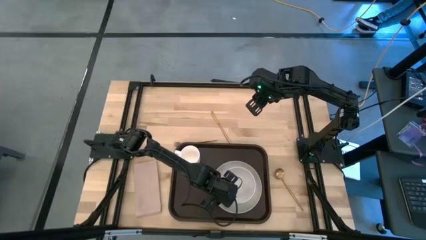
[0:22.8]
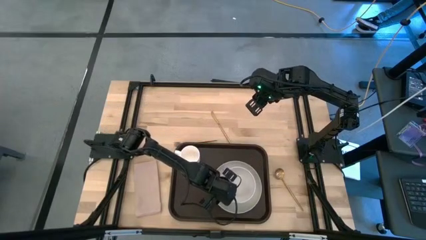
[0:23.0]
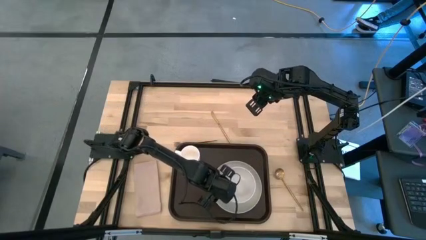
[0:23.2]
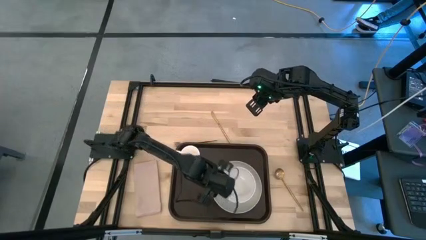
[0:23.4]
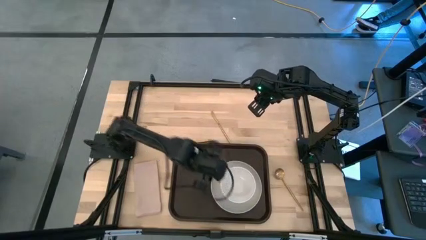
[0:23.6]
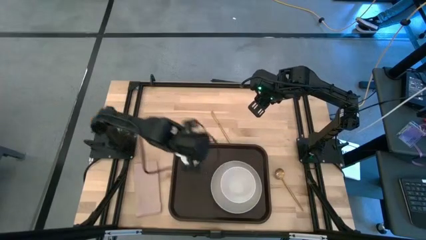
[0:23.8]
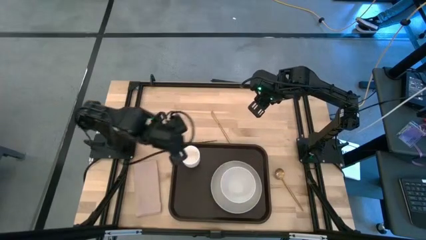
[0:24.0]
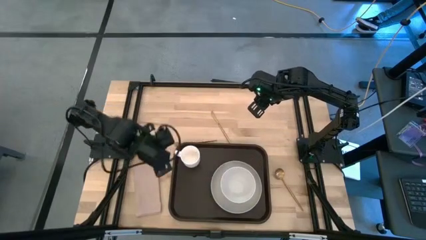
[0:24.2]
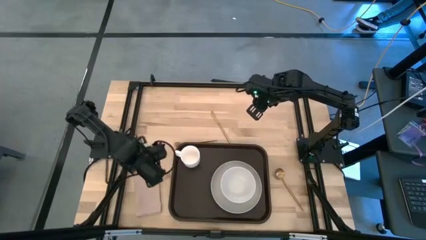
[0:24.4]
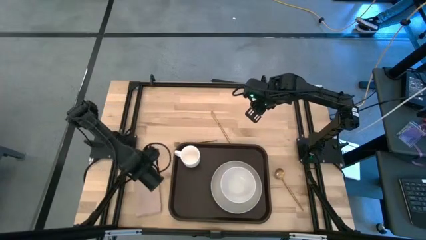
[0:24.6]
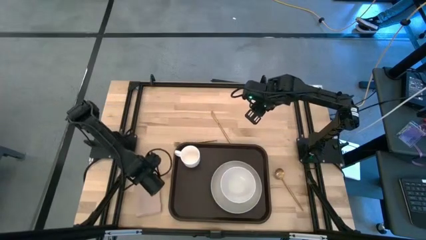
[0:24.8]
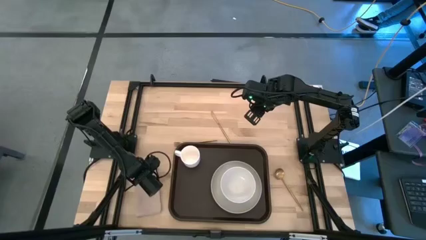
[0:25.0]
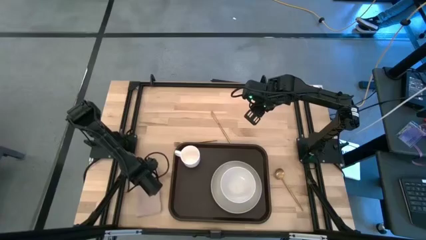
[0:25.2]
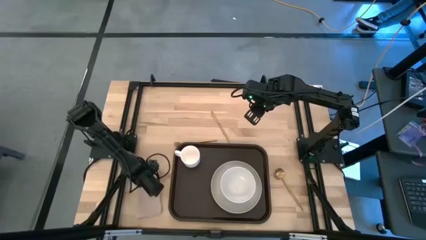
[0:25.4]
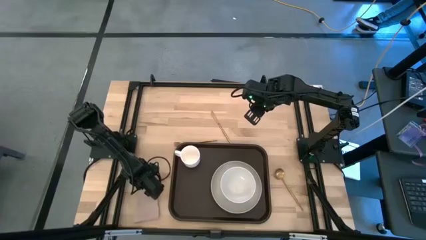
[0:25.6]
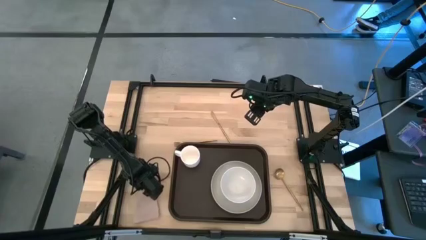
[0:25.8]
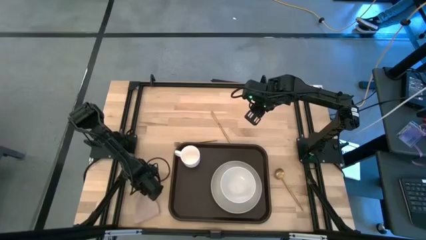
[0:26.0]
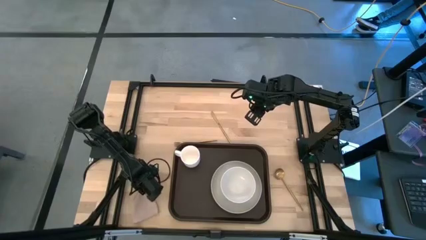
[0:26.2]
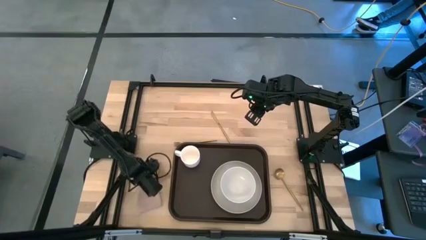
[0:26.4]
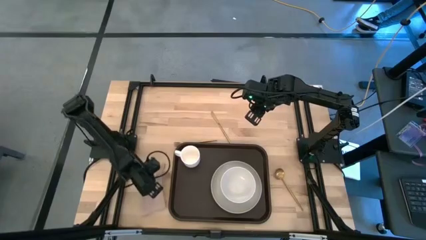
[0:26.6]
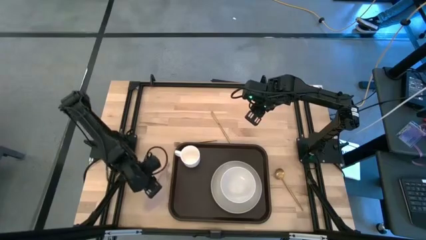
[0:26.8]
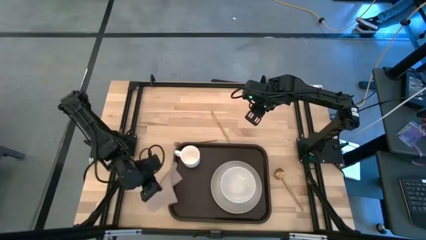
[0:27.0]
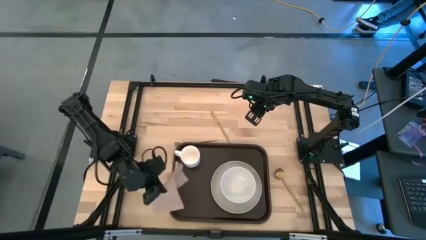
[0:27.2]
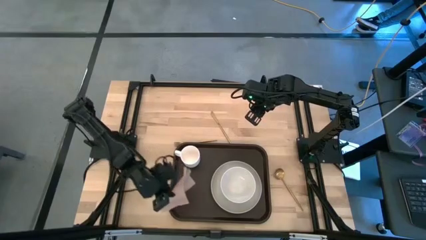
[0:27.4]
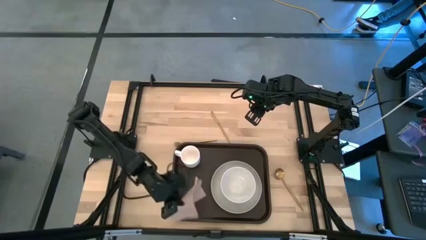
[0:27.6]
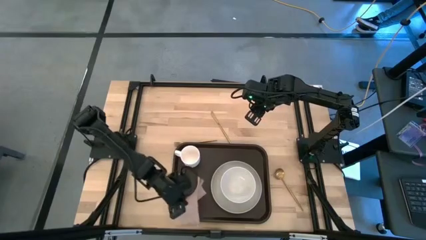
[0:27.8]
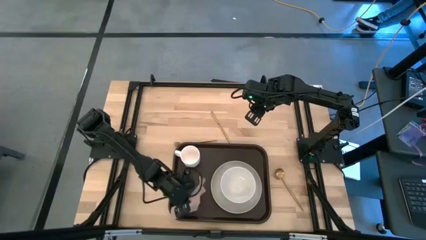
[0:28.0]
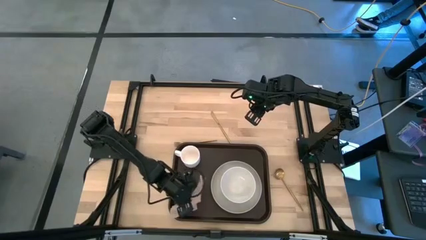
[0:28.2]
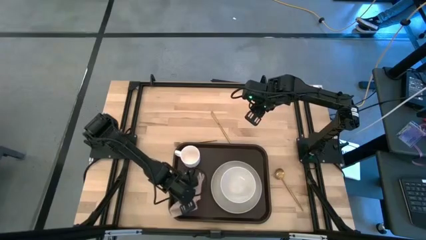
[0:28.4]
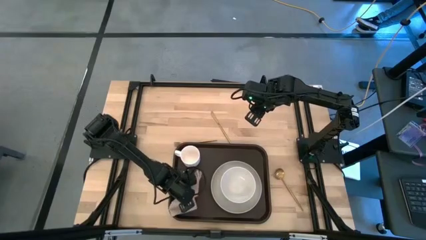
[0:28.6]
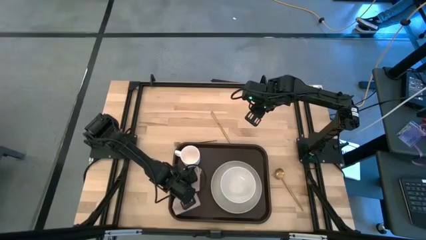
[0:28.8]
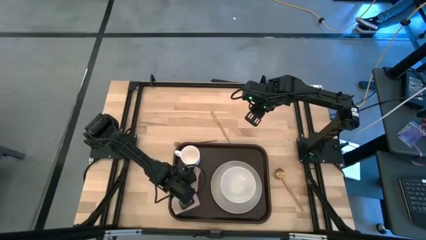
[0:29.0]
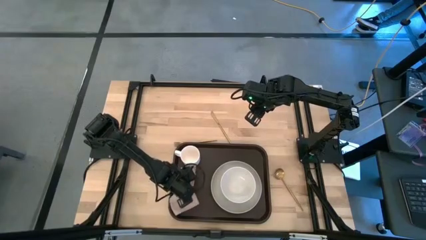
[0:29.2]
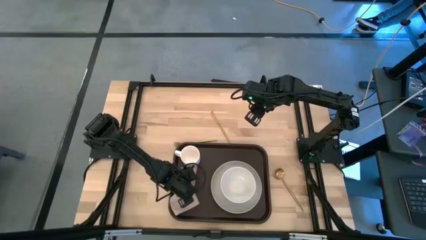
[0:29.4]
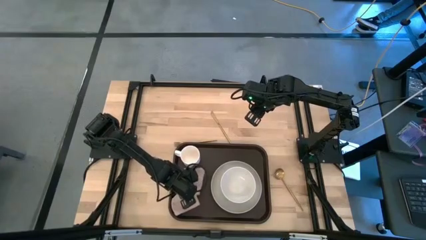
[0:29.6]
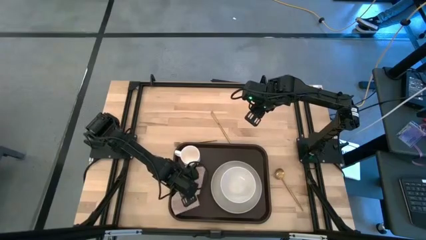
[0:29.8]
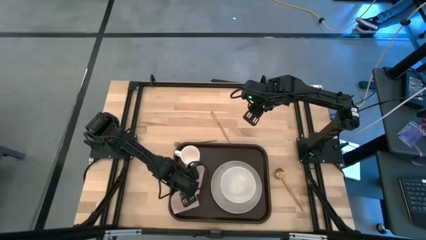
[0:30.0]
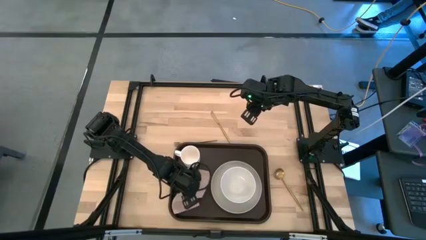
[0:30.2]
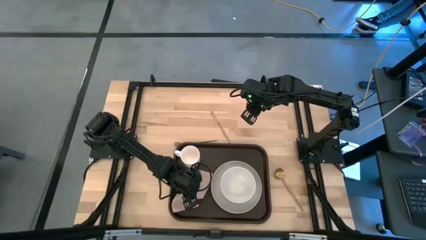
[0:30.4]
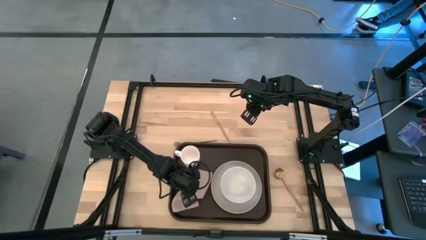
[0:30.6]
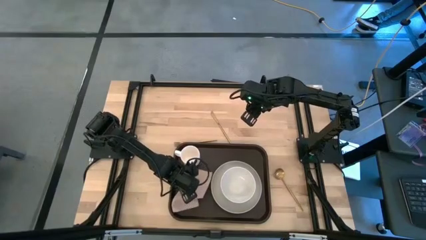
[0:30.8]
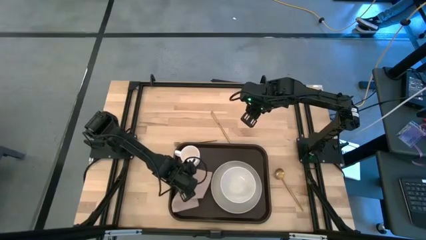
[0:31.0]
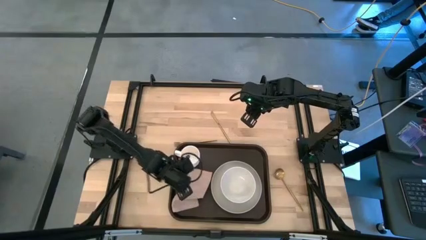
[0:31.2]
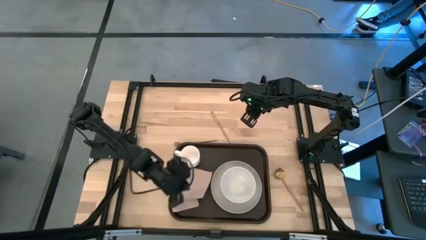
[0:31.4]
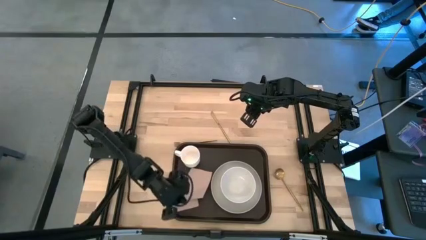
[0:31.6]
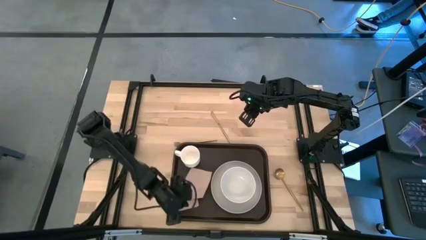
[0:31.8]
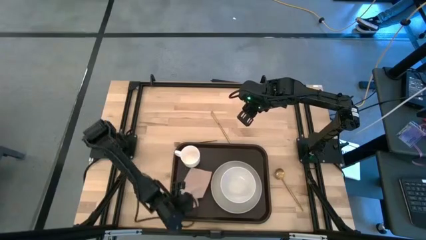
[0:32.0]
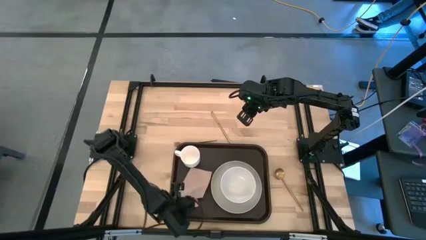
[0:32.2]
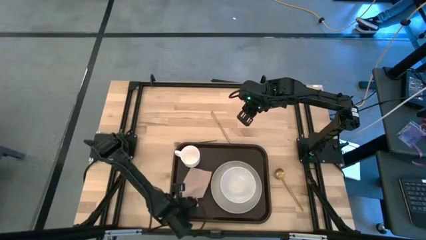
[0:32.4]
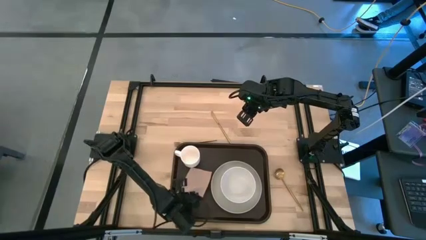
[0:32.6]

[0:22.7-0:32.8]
Task: Set up tray
Put the brown napkin on the black serving tray to the bottom of the white mug

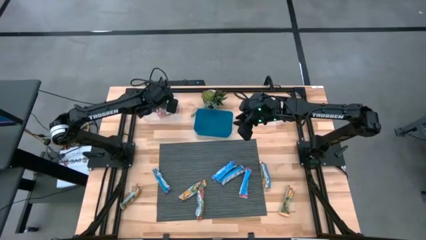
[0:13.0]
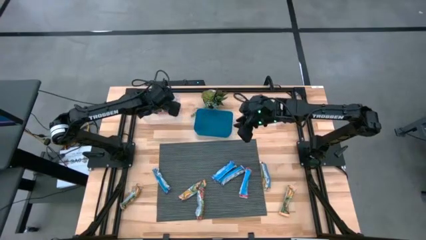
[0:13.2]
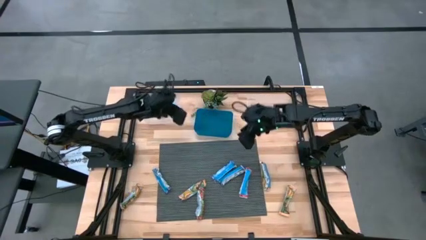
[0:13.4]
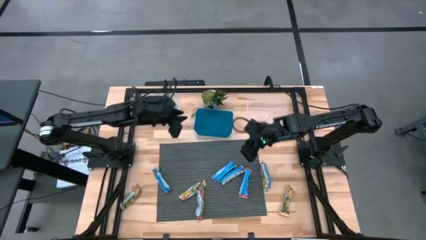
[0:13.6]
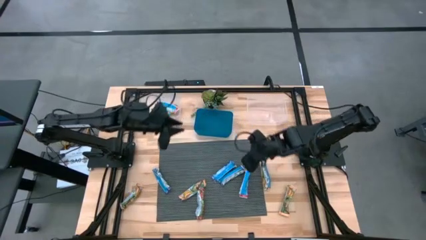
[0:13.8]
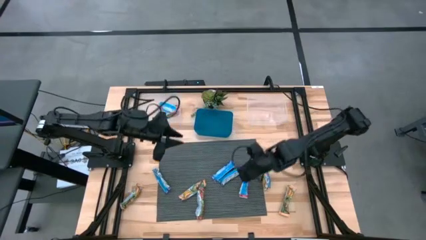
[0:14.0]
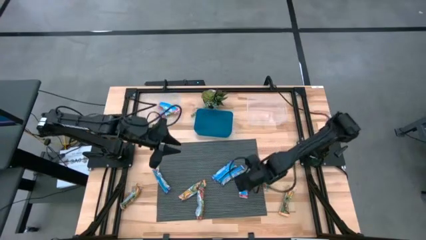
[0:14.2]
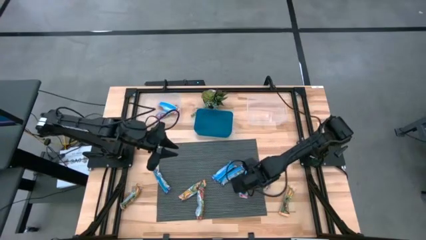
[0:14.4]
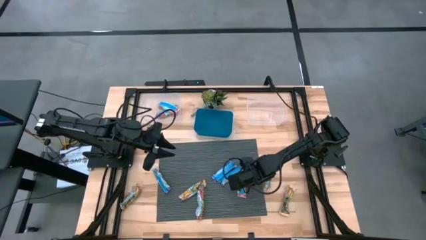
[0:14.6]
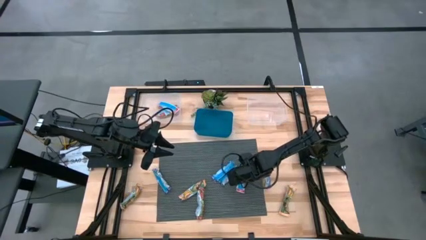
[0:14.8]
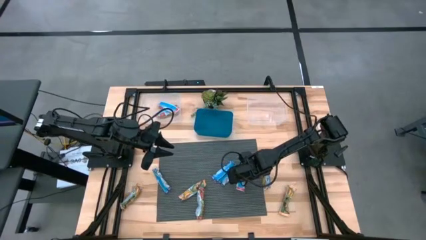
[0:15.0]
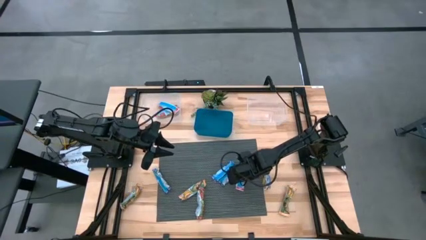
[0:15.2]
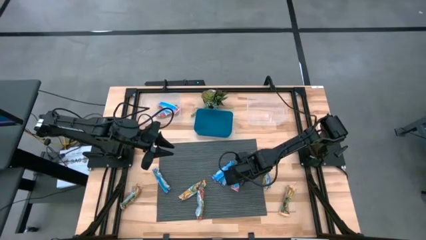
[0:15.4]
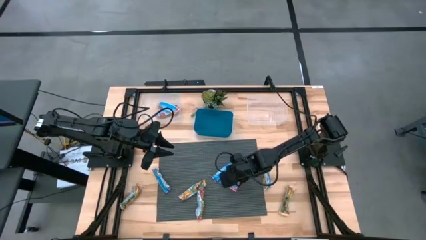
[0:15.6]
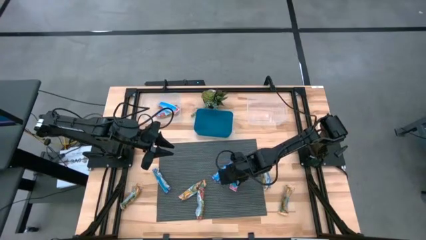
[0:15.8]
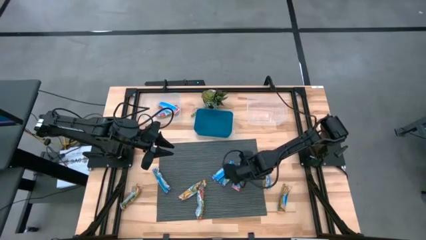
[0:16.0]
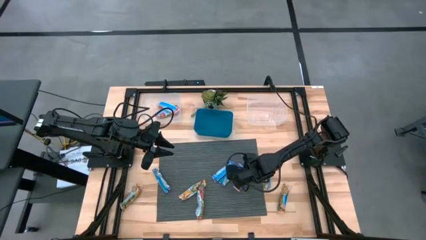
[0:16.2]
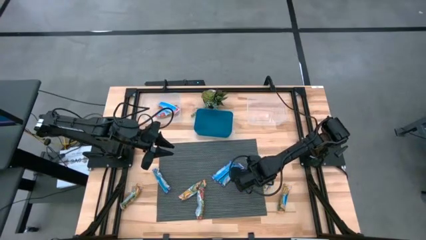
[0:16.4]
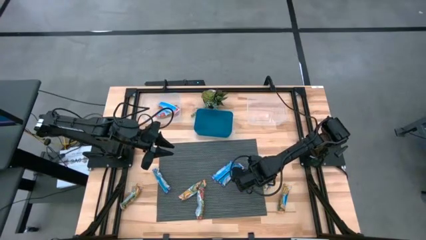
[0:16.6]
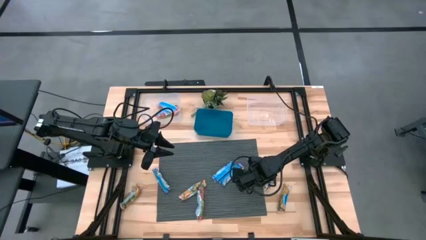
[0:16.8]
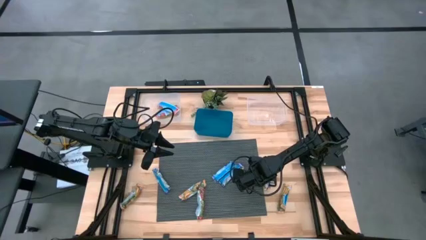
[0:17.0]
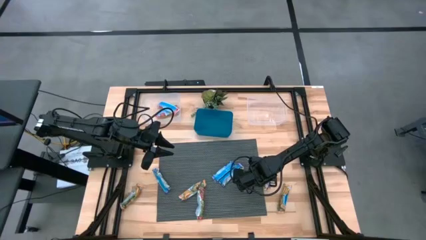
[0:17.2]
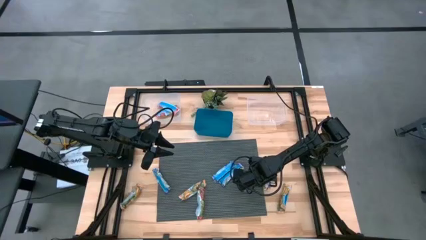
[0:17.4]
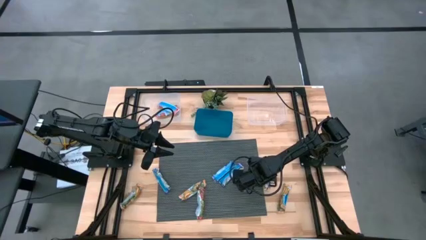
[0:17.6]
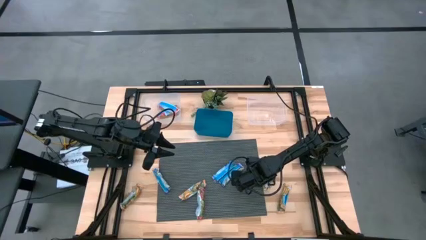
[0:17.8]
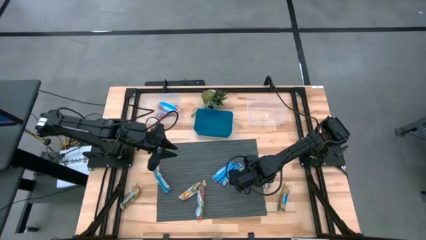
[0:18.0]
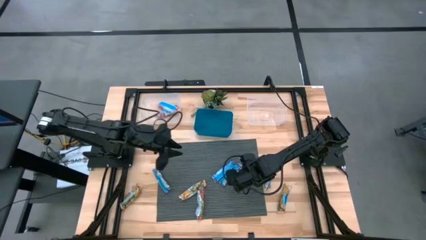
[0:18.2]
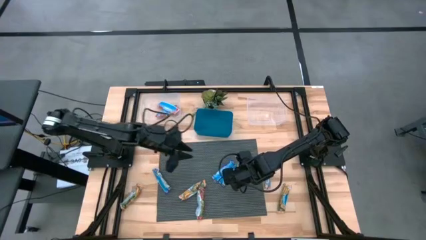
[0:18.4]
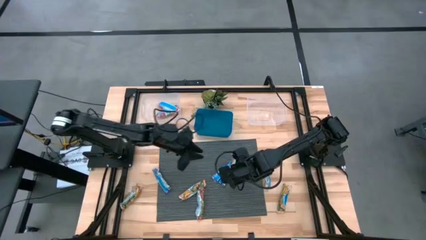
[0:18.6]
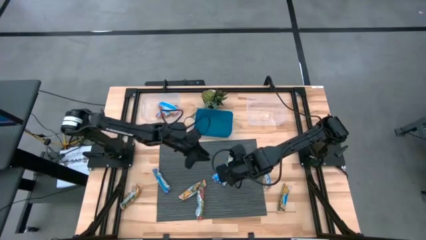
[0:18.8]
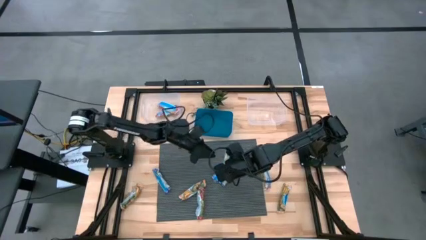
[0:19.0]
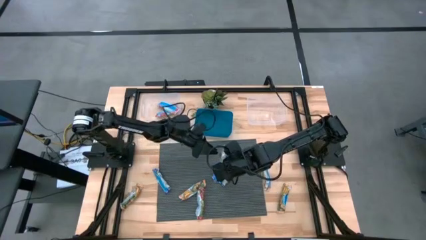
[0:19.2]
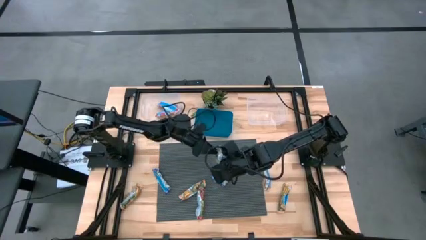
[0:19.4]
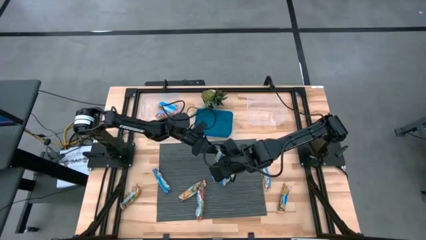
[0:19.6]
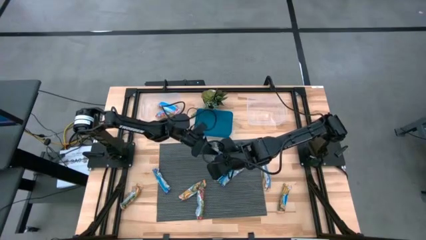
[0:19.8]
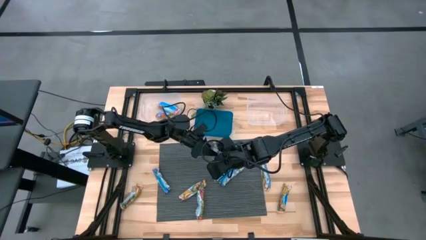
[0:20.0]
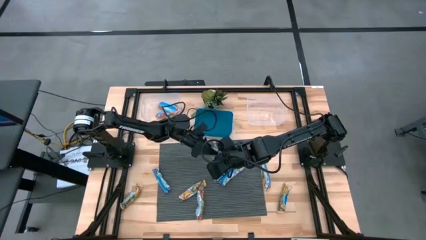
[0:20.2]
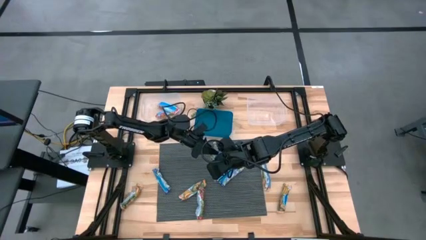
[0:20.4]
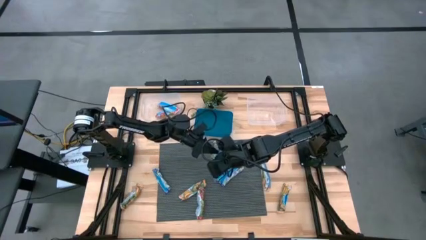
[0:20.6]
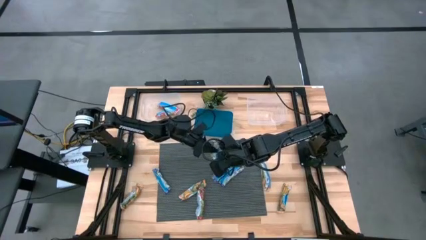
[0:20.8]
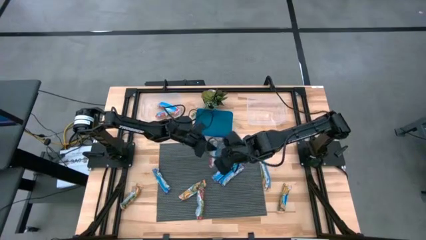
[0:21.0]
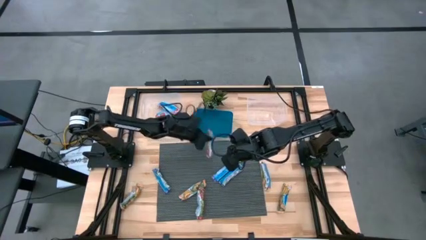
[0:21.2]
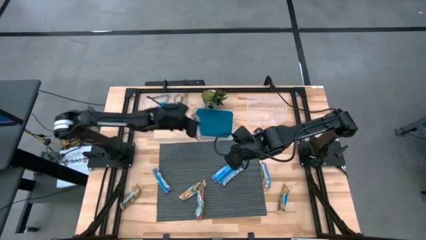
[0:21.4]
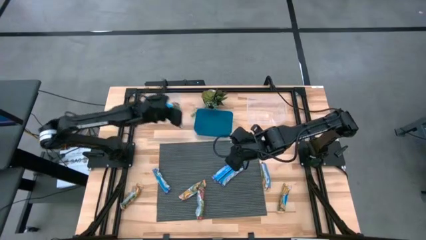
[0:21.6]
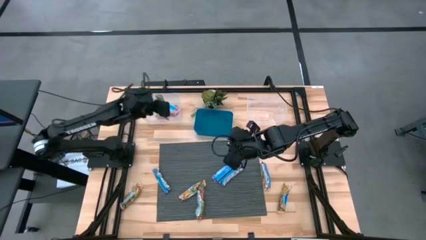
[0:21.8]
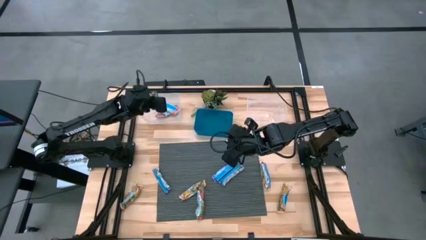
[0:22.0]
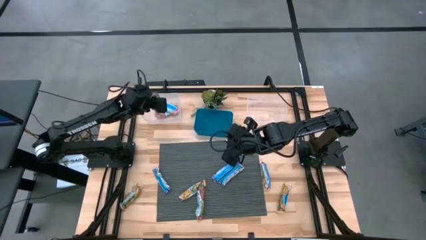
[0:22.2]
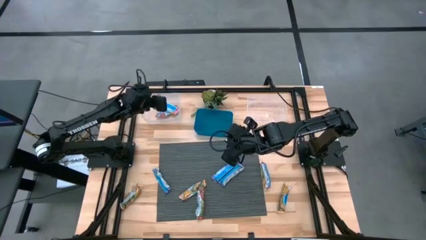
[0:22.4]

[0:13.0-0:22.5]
Task: Pick and place Granola Bars by type
Put the red granola bar into the left transparent bin
